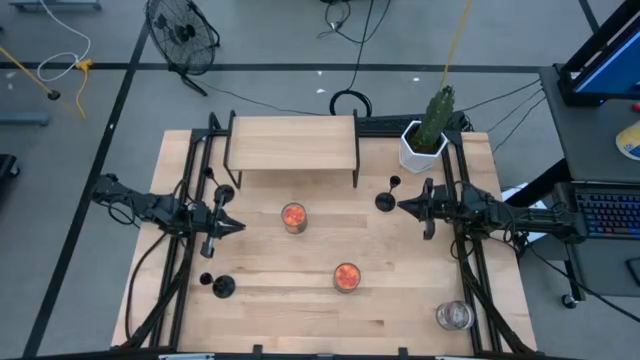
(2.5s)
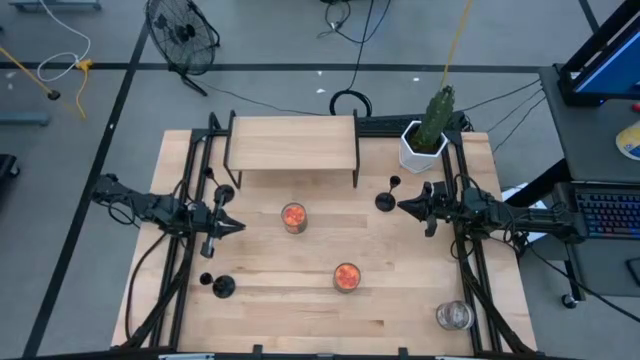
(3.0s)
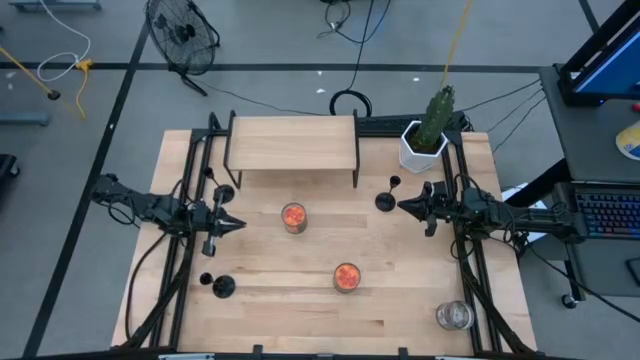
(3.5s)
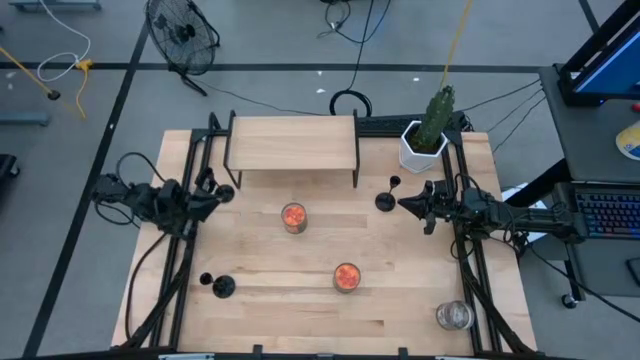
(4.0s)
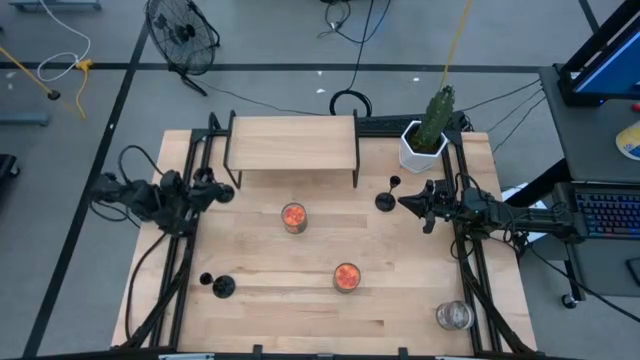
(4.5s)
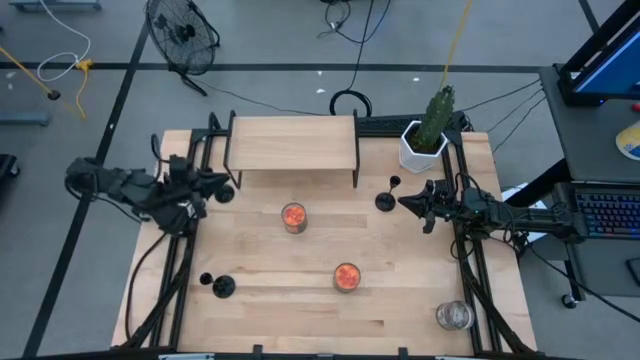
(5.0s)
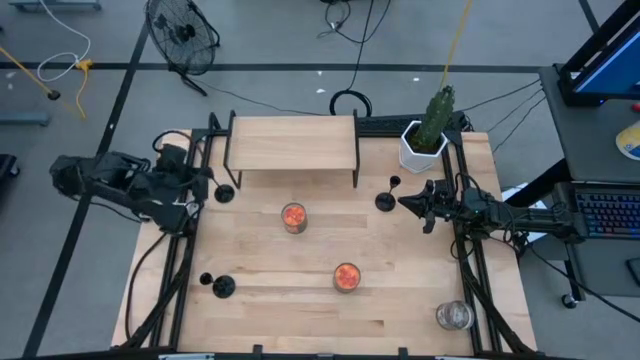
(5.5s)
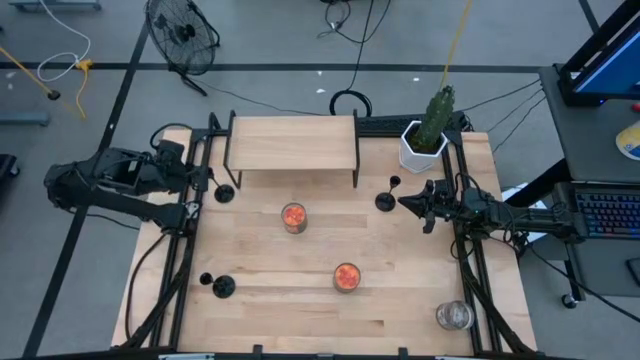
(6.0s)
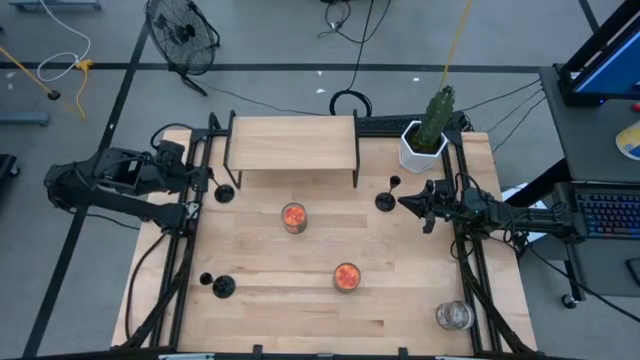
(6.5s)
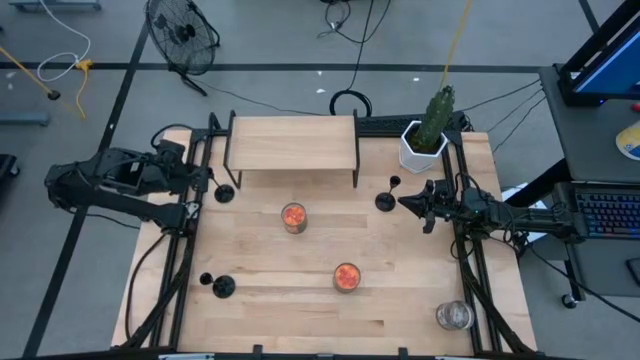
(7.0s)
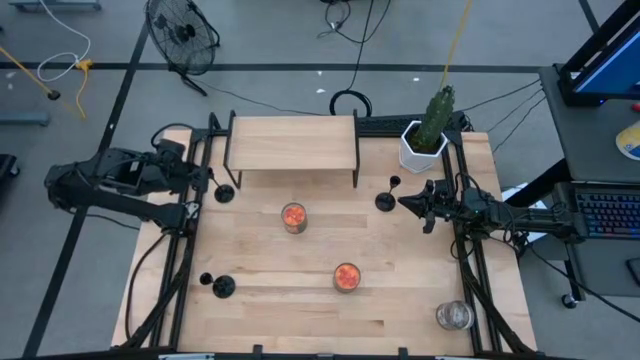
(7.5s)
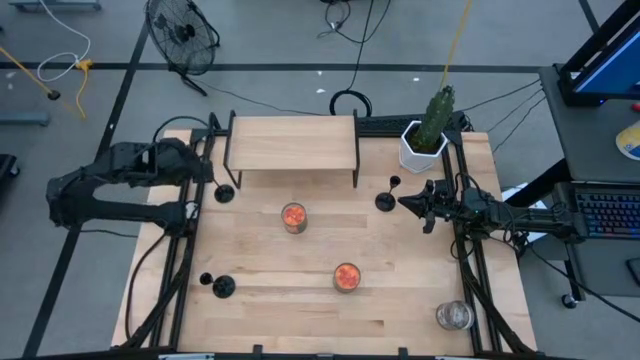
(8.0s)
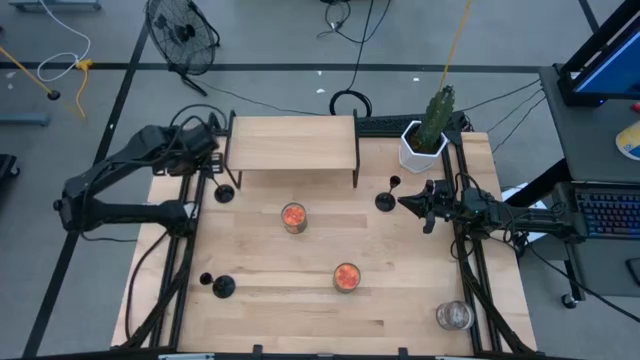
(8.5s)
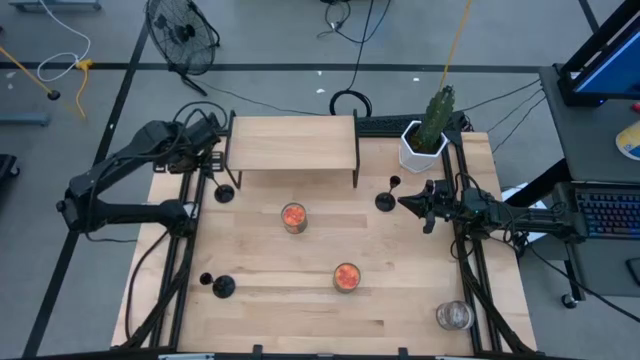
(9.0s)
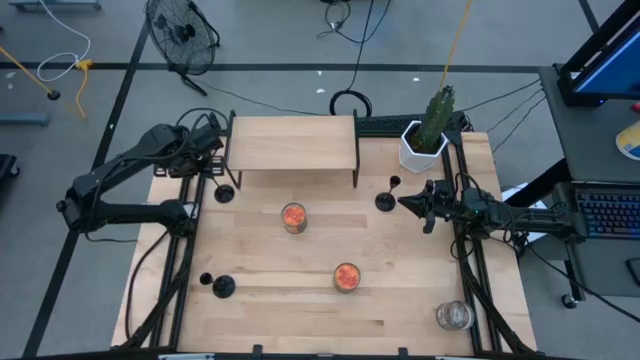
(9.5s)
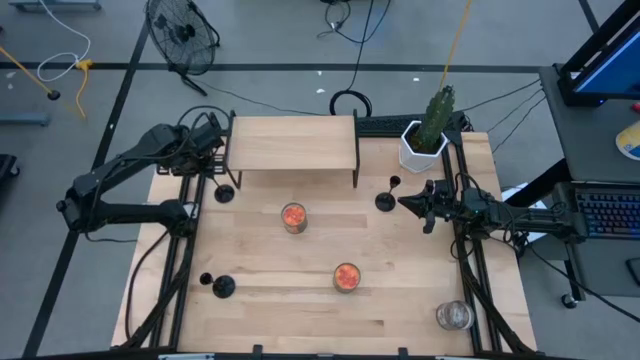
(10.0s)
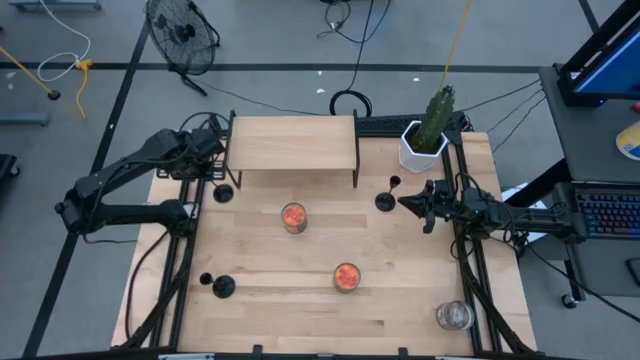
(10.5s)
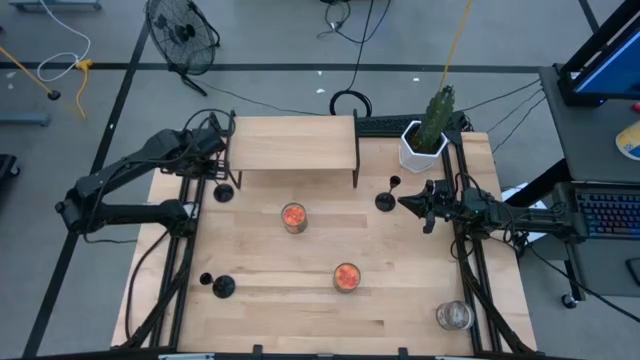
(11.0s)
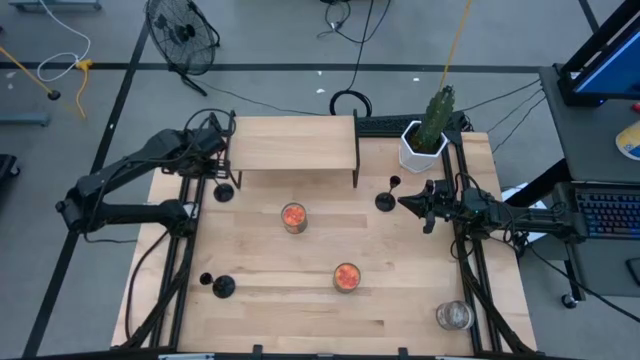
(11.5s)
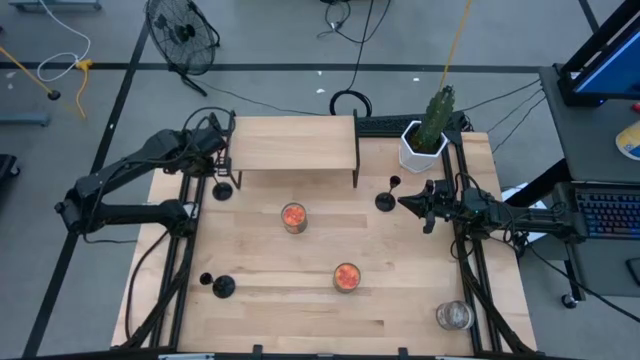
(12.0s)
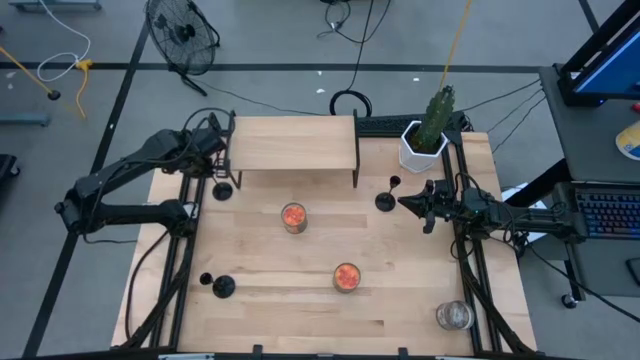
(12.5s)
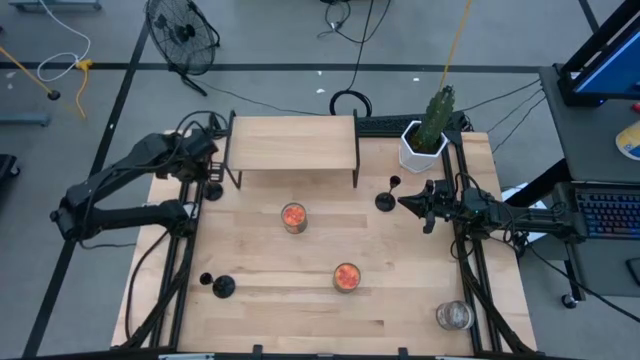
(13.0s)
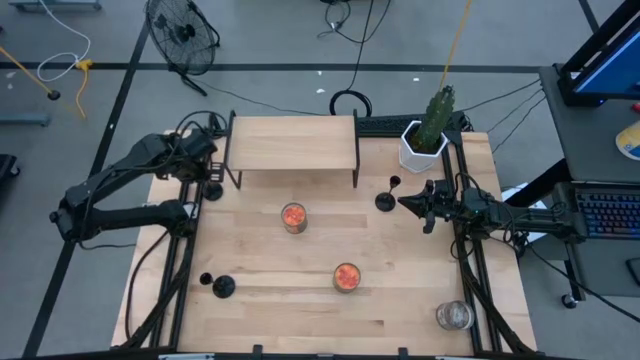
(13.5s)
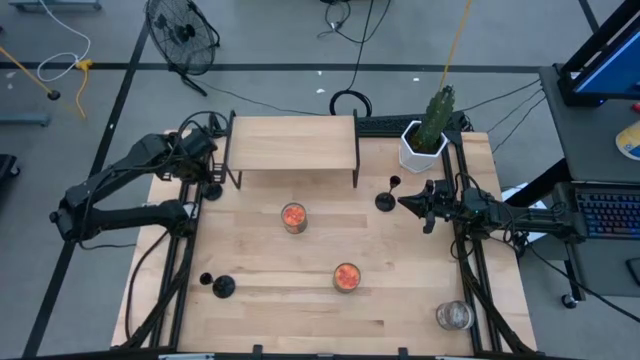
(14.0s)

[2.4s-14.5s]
Task: Pick & Place candle stick holders
Put the top left candle holder on the shelf

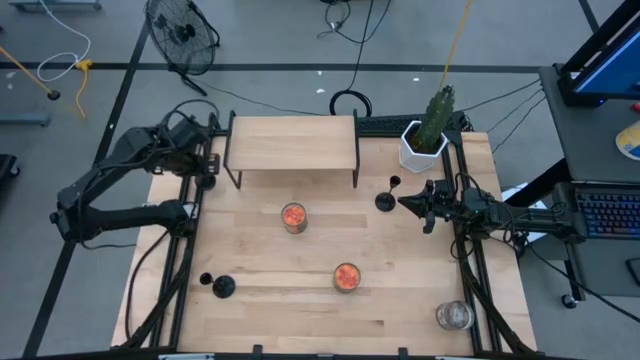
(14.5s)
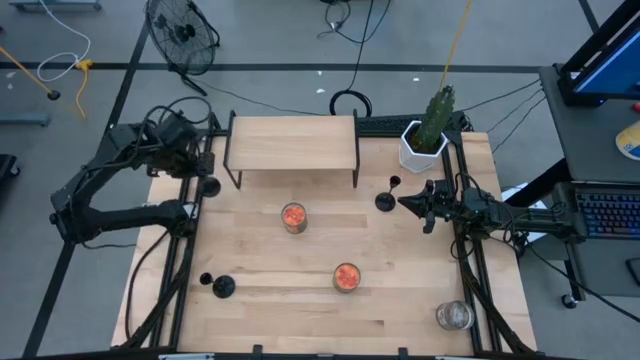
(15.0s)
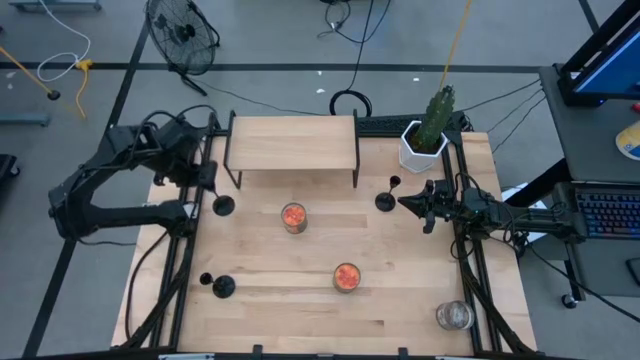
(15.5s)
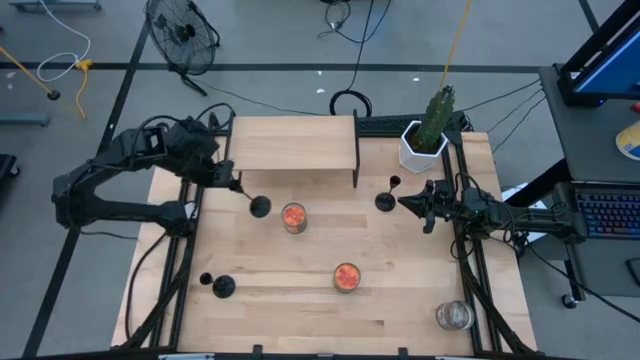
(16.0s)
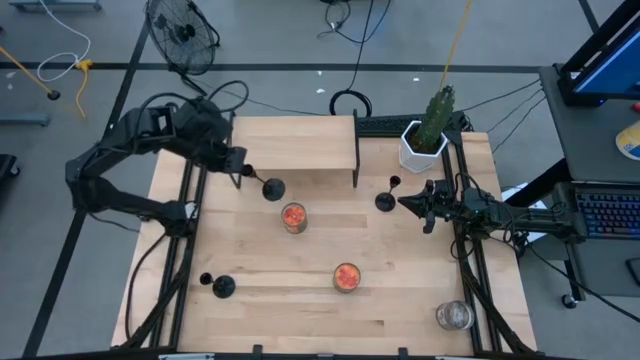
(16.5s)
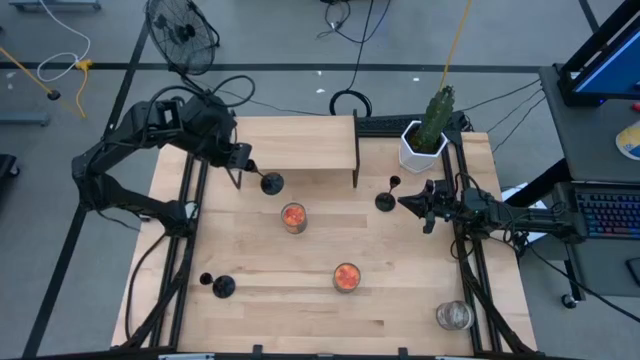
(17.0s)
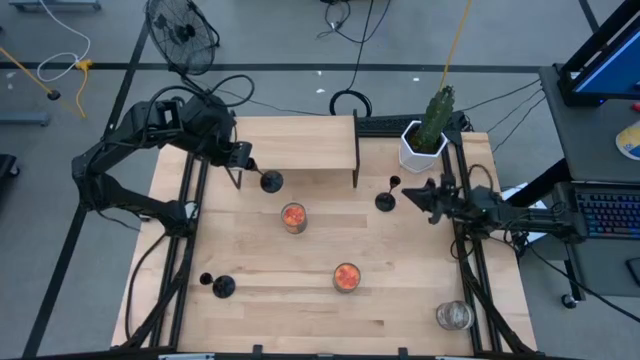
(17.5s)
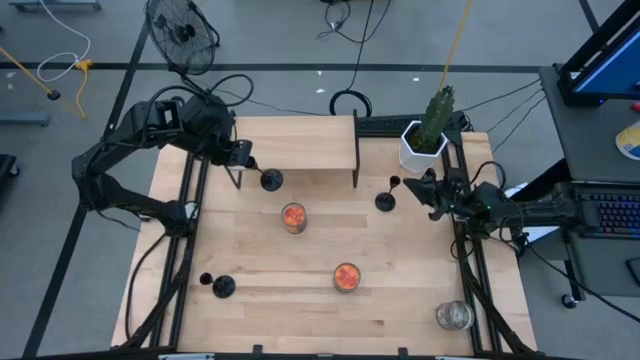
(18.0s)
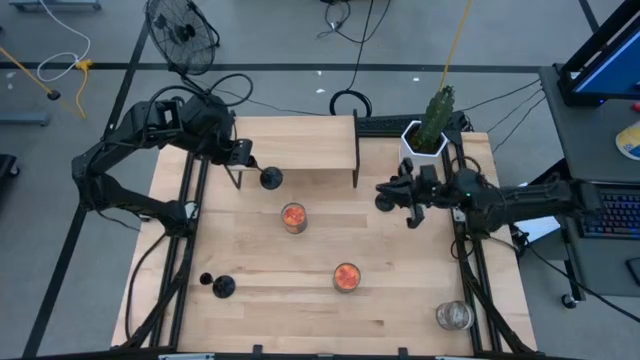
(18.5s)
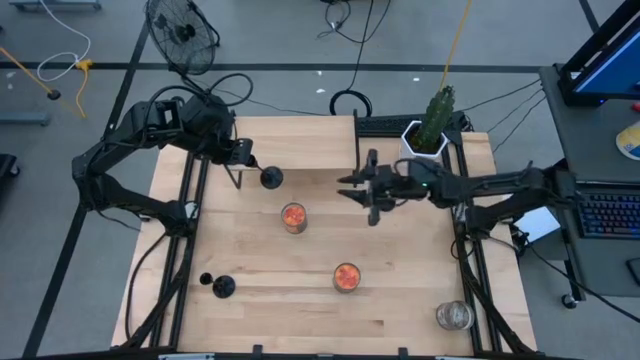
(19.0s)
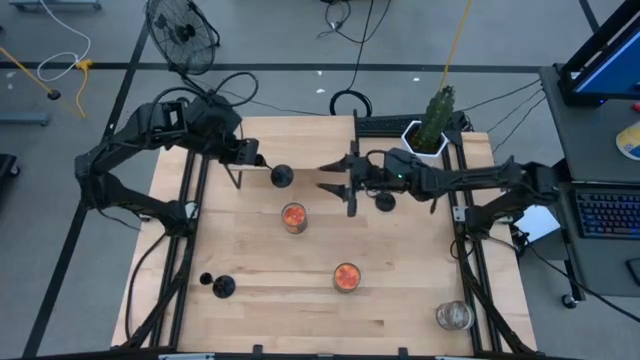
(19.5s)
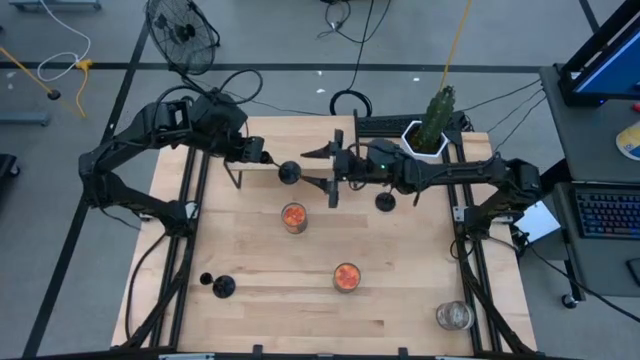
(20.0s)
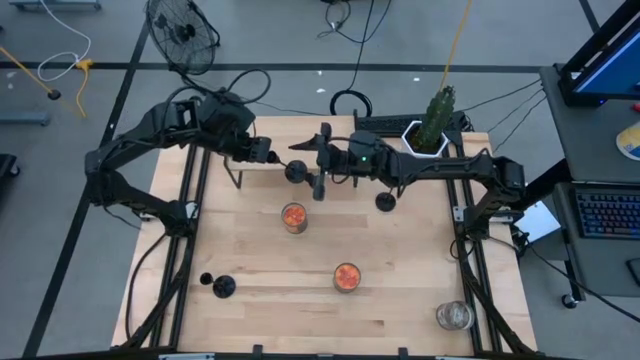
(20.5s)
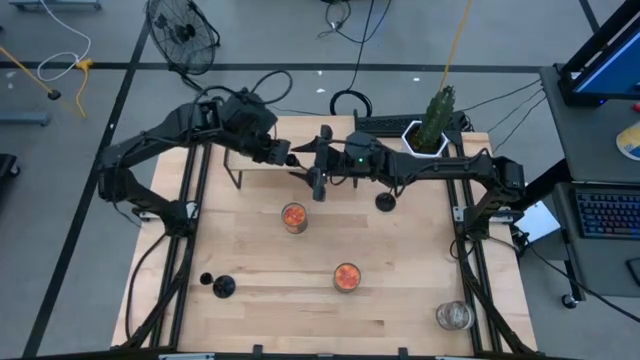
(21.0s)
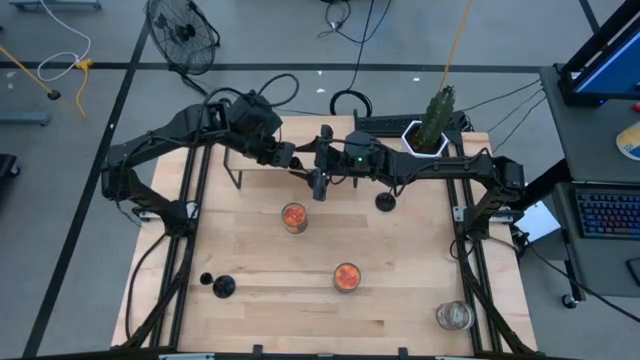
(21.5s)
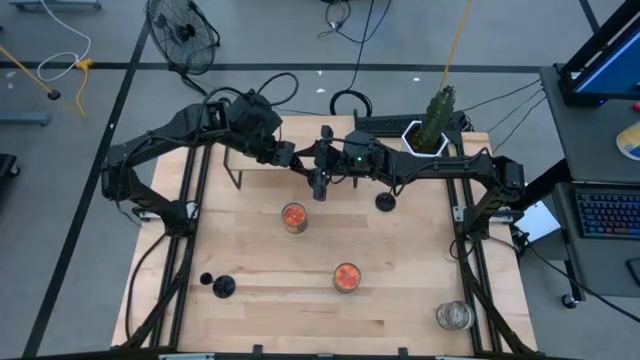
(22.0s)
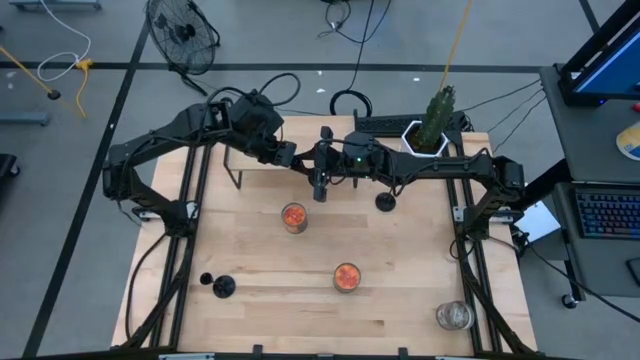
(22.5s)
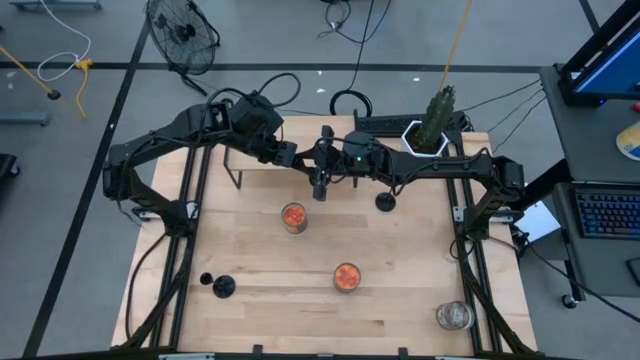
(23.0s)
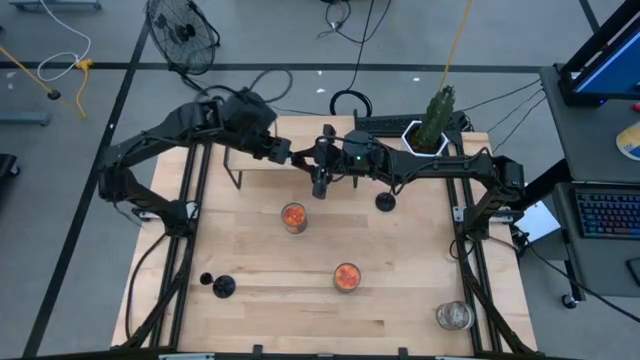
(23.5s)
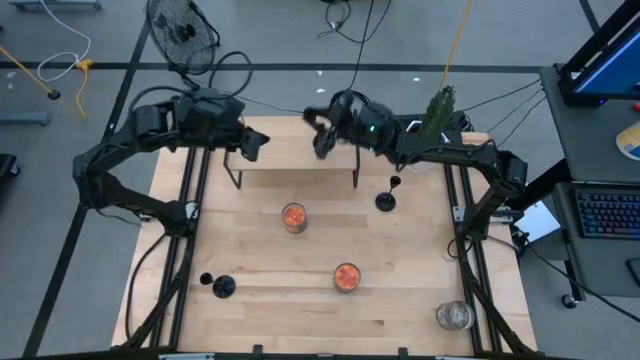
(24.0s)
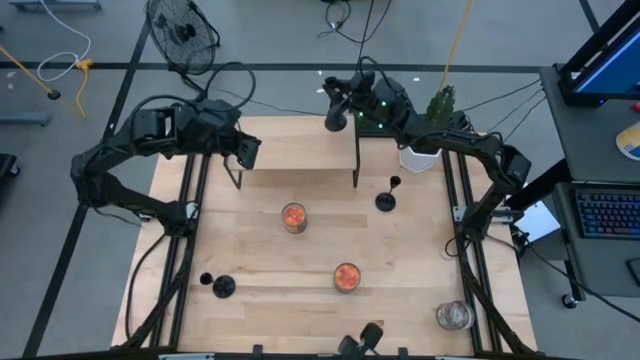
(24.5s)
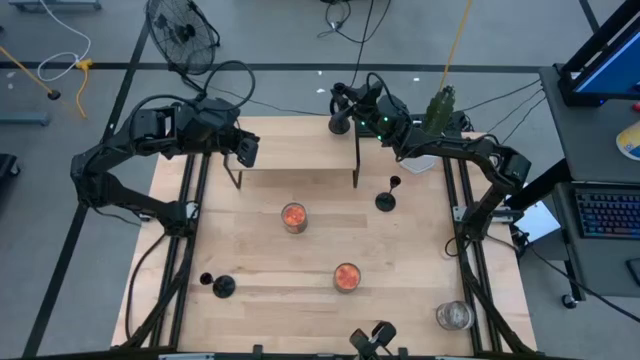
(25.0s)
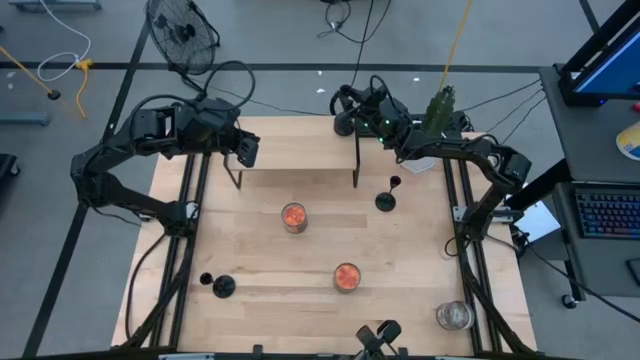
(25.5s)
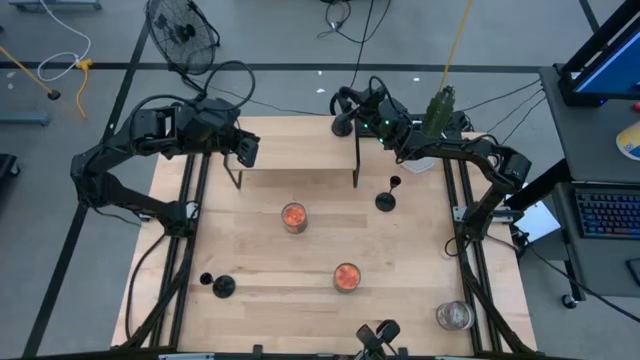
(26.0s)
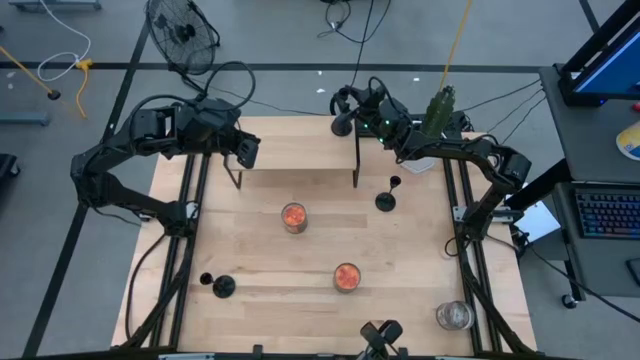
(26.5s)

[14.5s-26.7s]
Put the top left candle holder on the shelf
